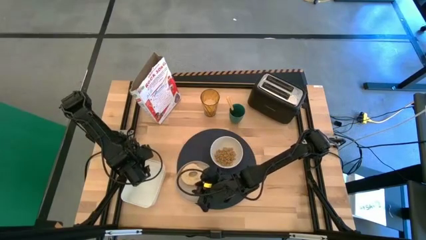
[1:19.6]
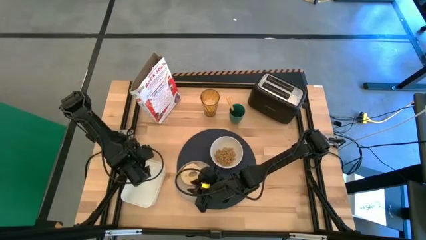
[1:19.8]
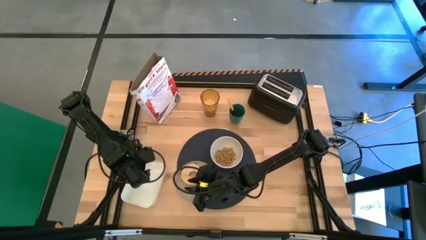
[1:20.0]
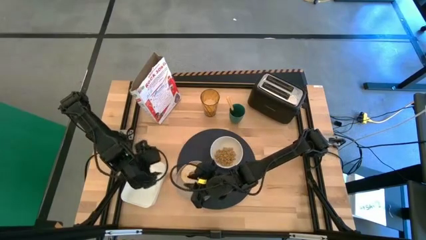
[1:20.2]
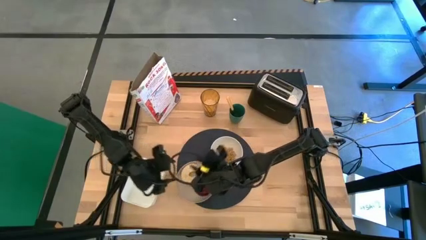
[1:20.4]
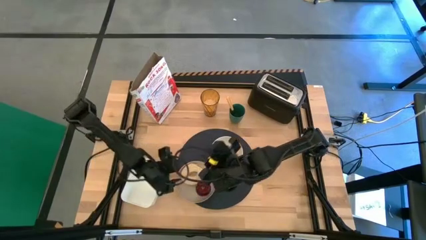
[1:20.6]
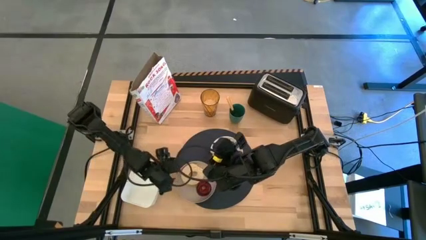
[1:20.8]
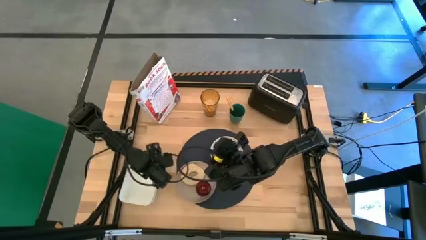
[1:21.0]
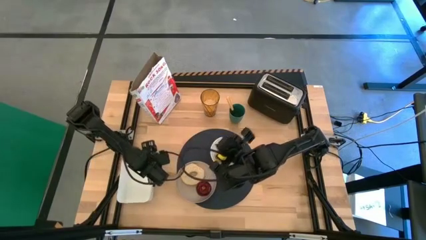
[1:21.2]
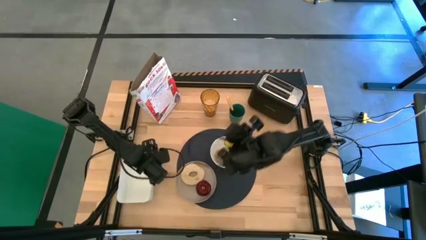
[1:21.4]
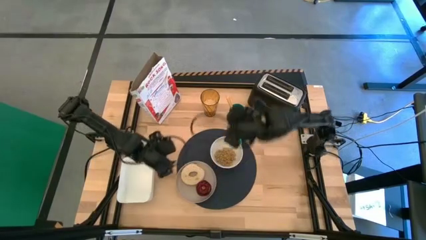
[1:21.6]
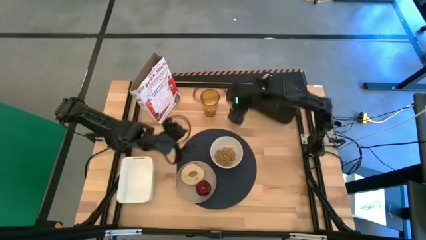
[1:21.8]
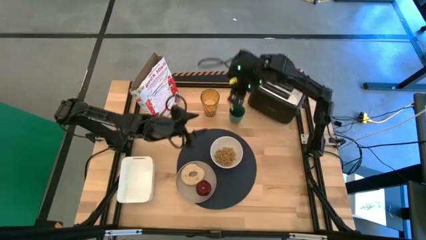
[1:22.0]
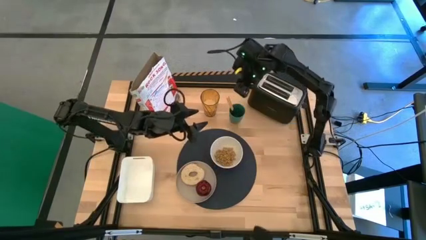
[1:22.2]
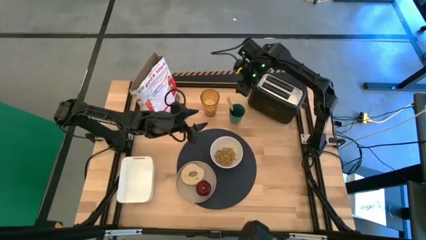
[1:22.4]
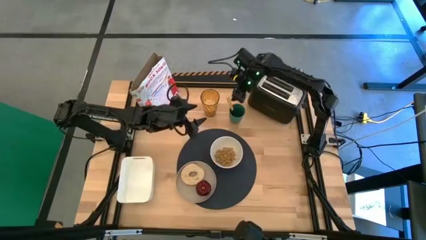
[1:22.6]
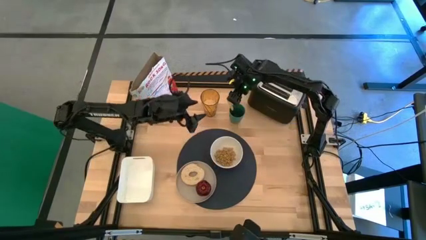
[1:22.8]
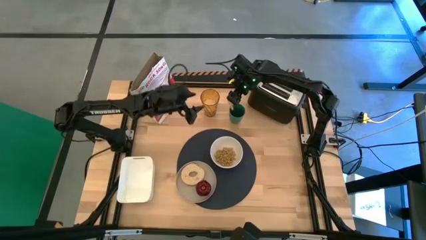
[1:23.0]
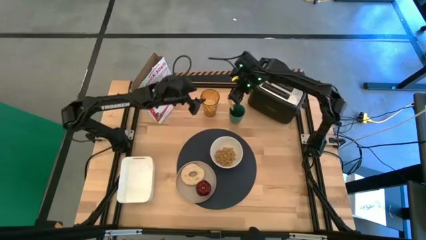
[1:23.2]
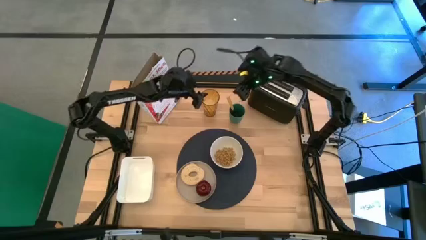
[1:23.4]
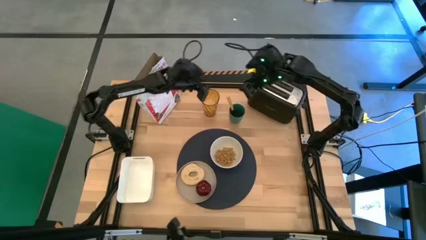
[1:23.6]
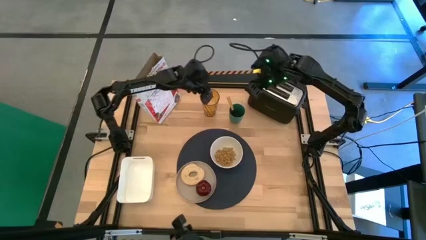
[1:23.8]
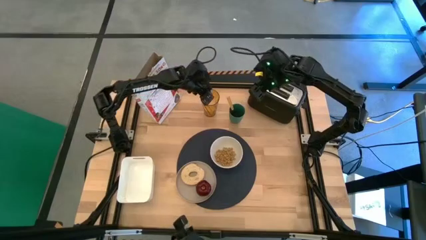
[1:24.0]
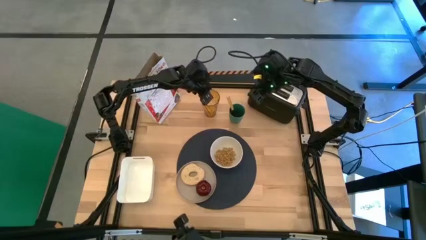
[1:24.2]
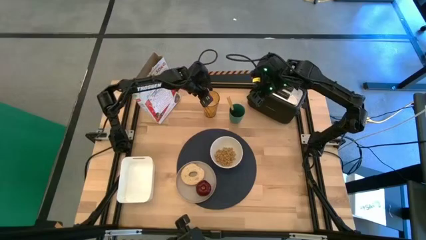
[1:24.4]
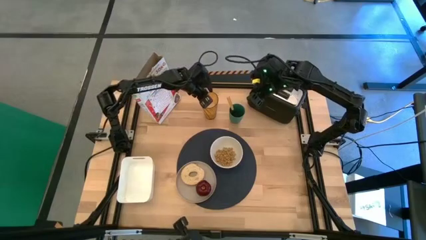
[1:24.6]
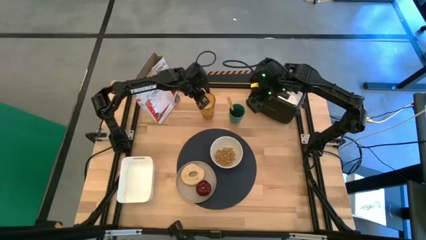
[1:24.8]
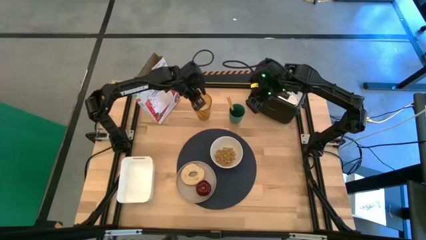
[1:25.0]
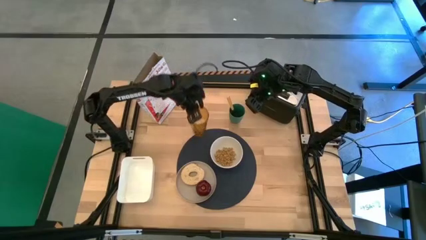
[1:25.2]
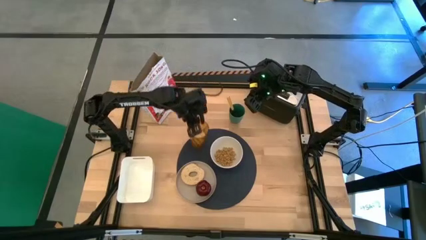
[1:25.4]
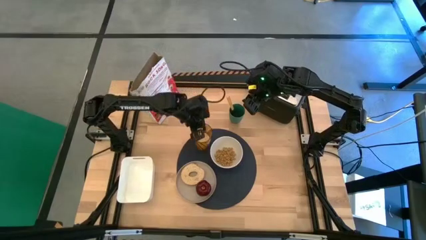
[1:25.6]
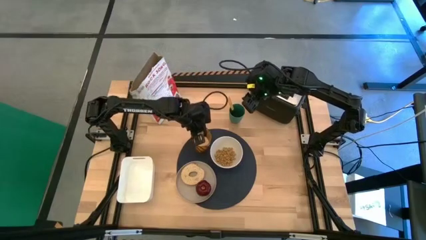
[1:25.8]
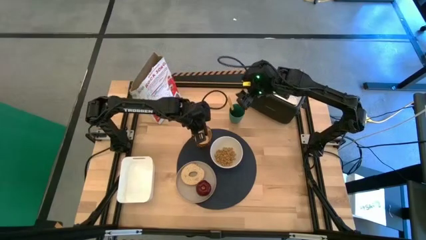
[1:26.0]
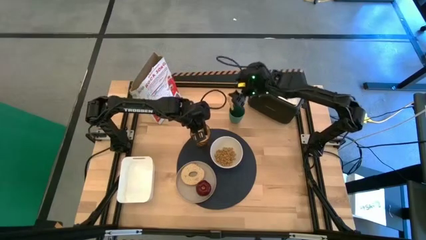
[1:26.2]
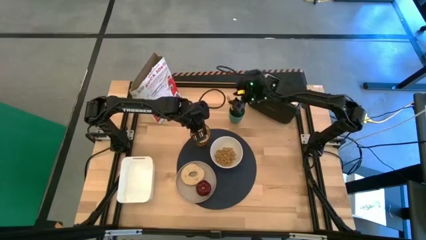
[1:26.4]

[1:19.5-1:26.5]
Task: Arrange a breakfast setting
Put the yellow glass cup onto the black table mat above the gray plate

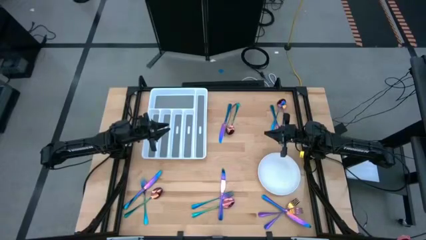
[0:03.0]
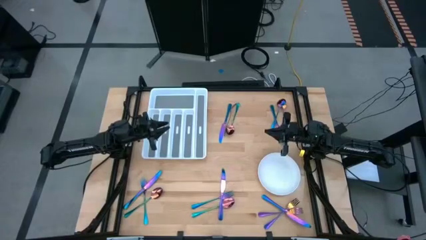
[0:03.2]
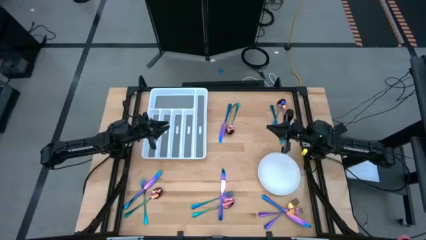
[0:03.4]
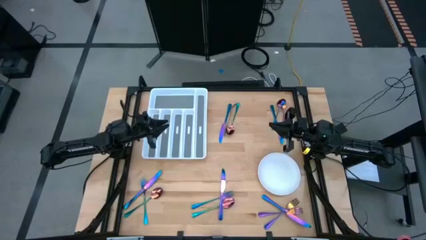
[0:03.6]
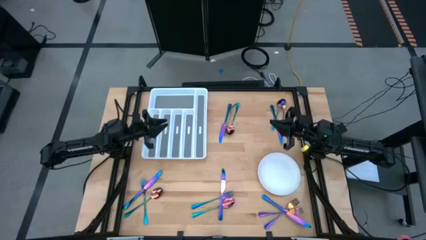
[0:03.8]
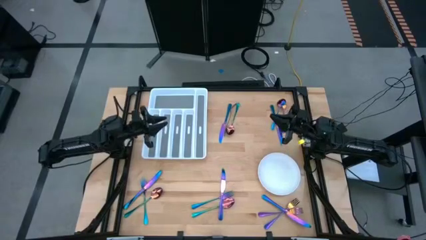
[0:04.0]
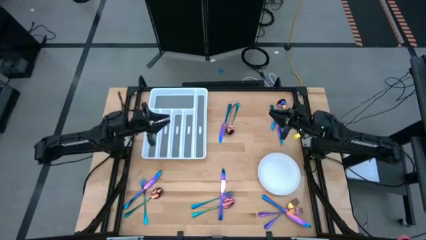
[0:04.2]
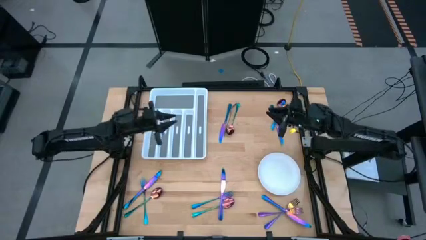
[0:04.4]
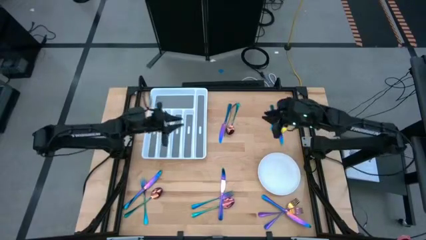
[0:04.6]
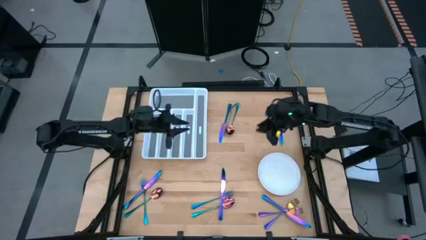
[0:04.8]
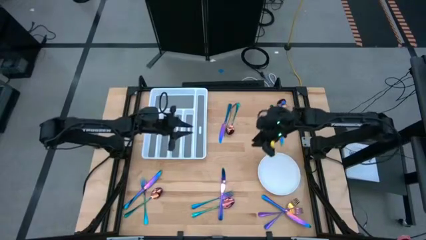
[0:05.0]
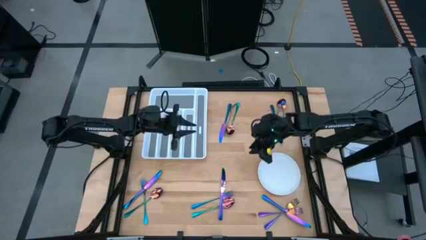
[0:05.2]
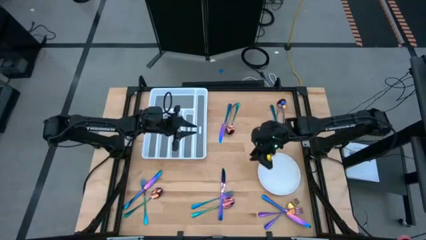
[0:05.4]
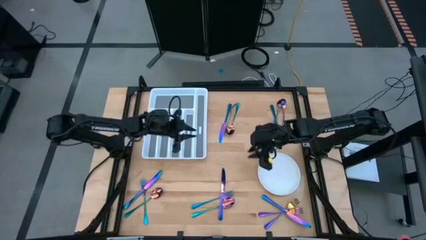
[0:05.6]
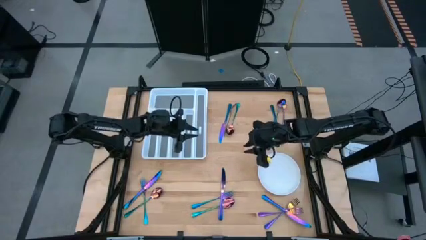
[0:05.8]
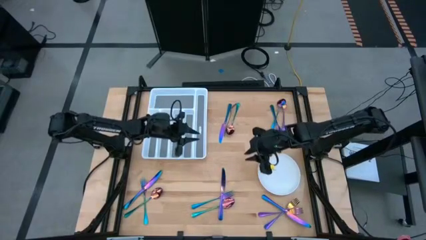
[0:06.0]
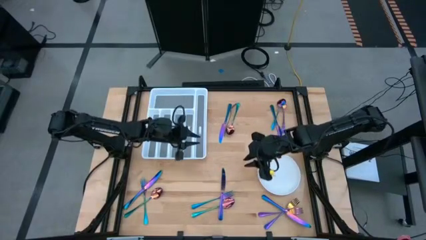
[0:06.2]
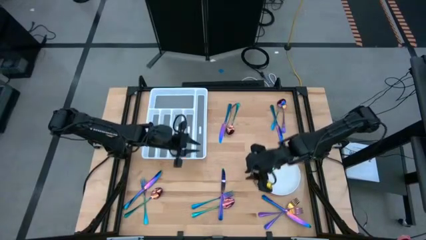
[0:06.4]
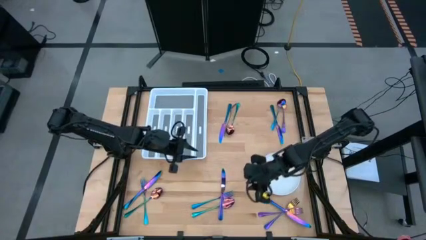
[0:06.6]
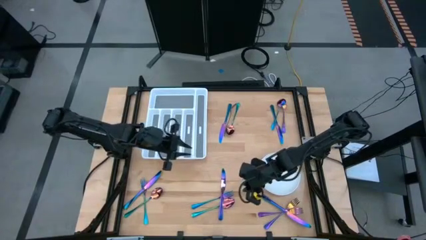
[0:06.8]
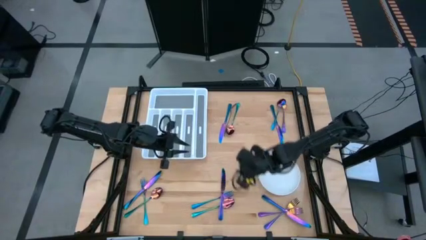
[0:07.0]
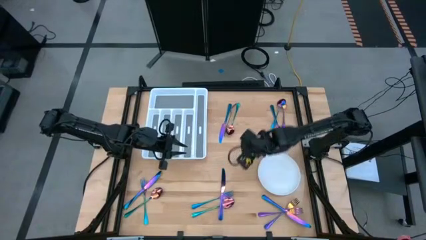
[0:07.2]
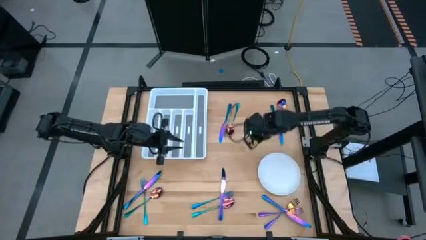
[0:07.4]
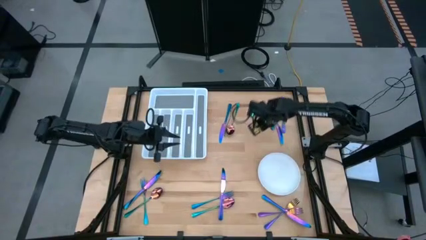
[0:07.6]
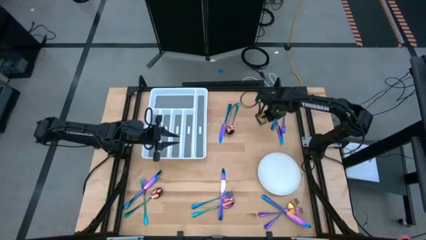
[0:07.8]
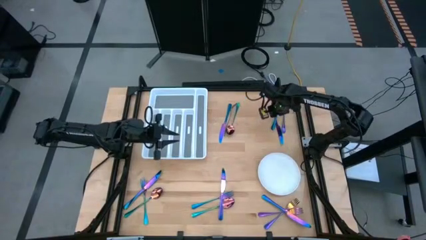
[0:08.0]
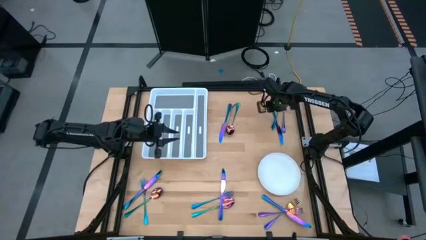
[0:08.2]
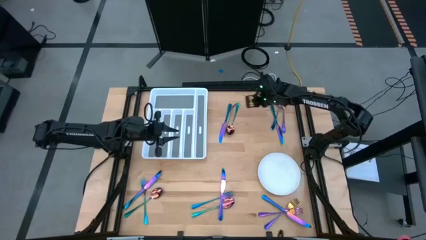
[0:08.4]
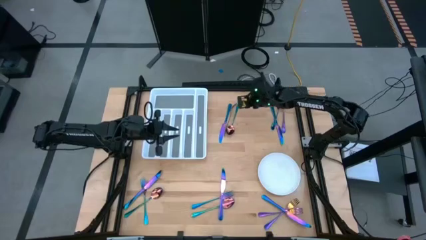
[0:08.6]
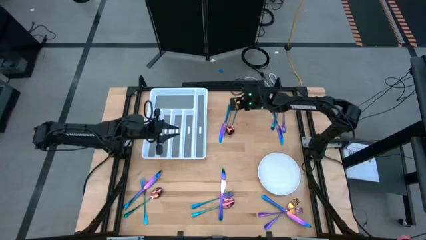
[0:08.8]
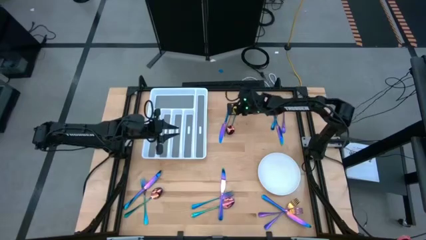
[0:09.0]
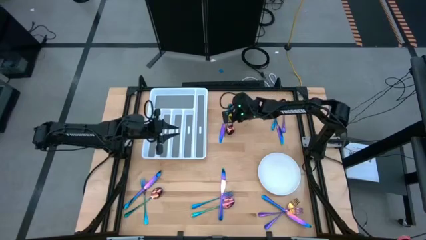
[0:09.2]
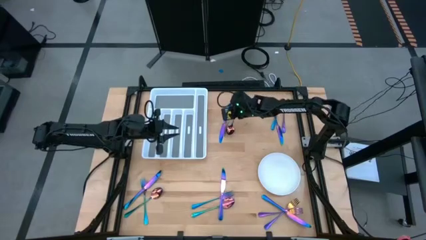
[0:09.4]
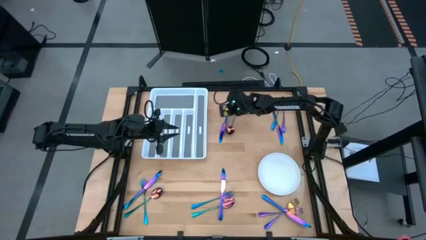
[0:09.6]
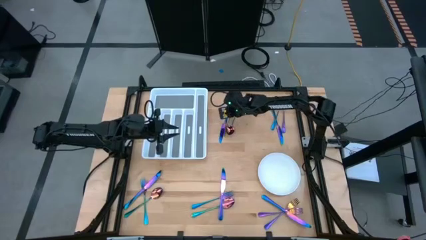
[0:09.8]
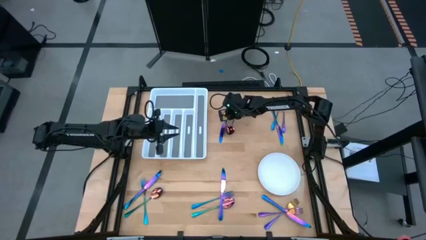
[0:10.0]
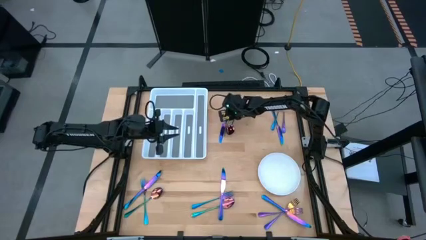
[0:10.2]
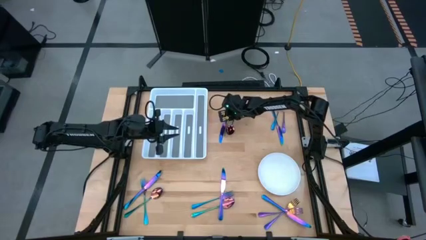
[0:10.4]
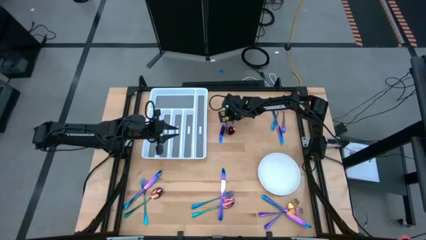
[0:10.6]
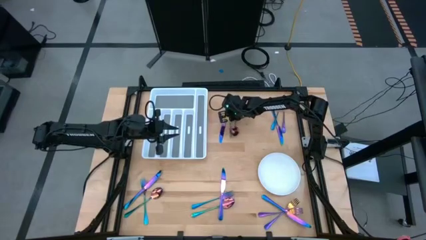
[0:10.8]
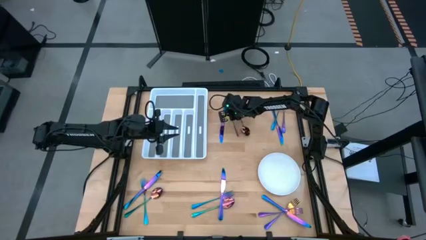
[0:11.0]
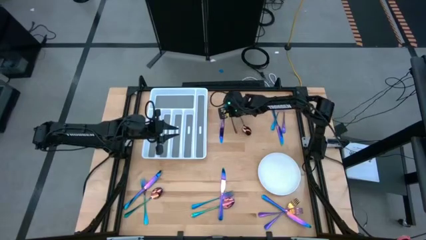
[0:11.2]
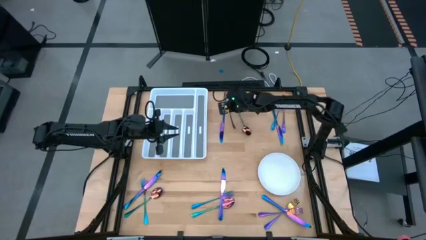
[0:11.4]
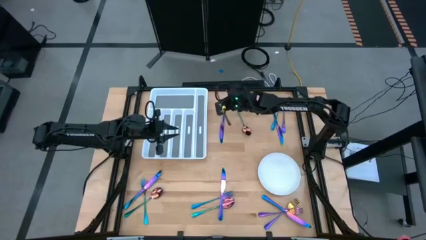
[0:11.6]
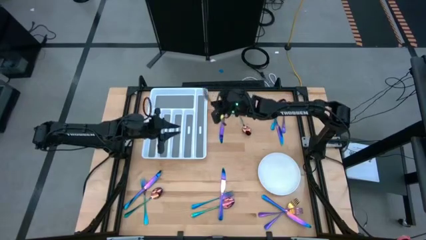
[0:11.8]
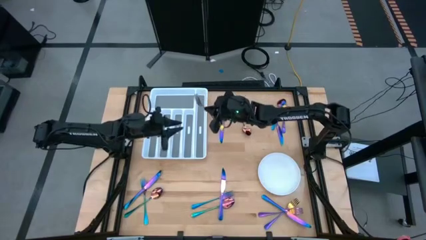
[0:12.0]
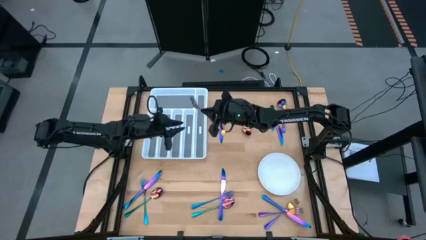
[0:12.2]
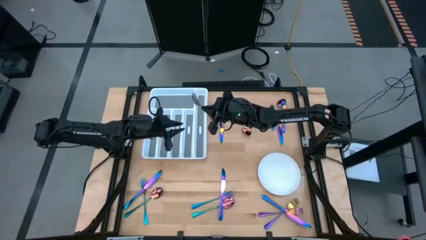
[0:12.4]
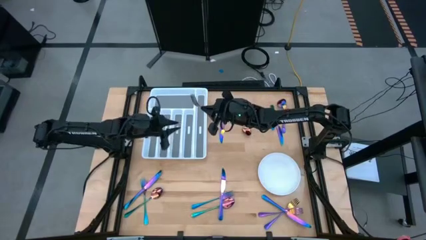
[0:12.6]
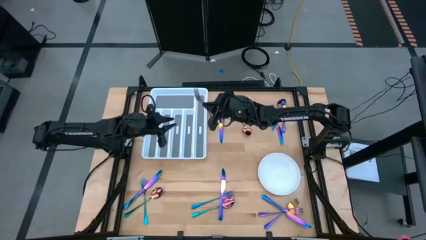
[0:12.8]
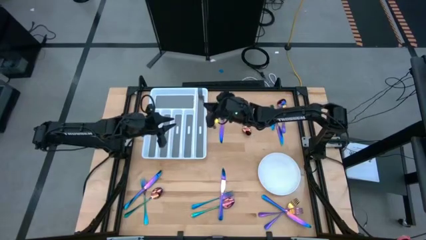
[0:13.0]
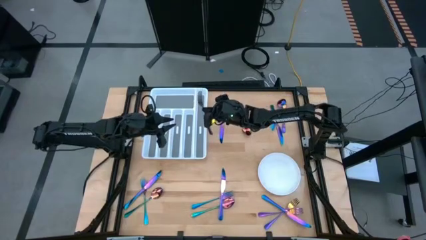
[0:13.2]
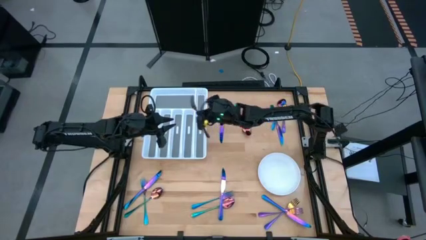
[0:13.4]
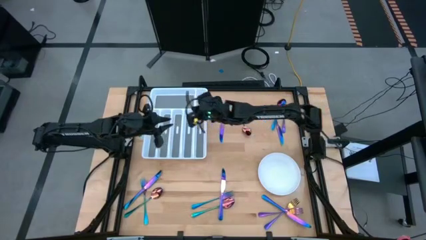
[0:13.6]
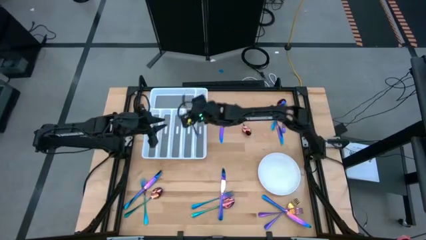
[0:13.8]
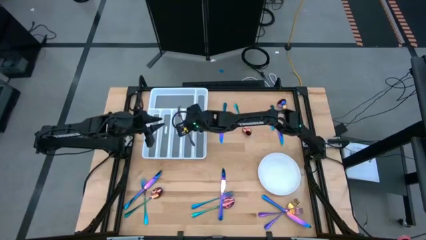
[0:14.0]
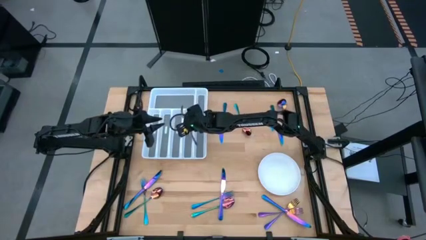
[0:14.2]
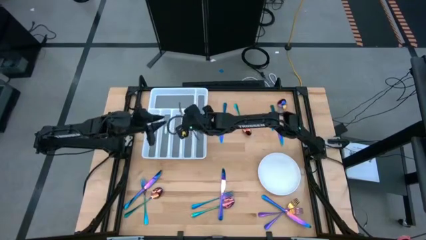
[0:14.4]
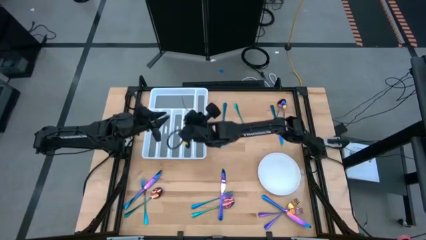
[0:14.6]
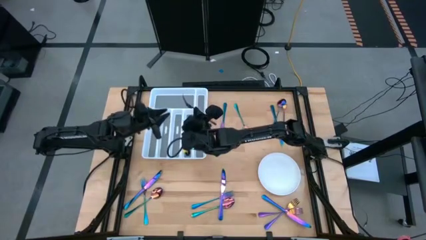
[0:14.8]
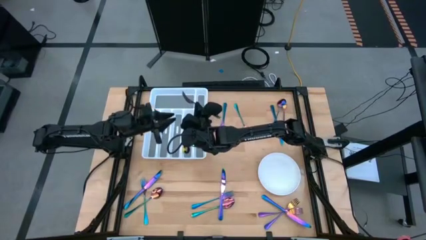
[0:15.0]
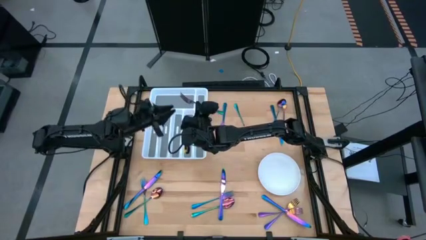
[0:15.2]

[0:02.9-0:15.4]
Task: Sort silverware
Put the iridescent fork into the white silverware tray
